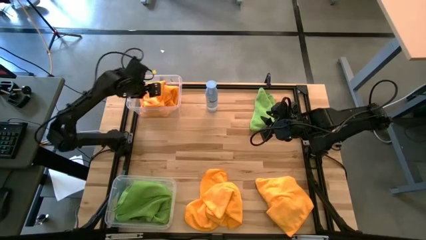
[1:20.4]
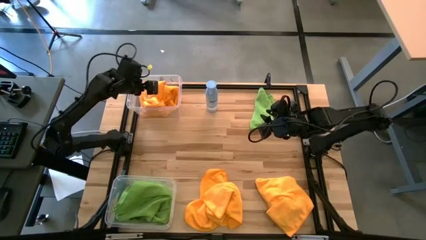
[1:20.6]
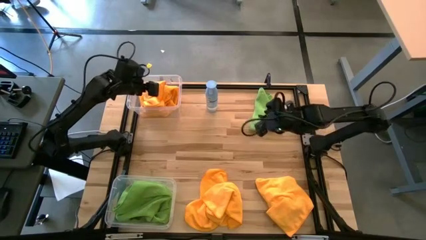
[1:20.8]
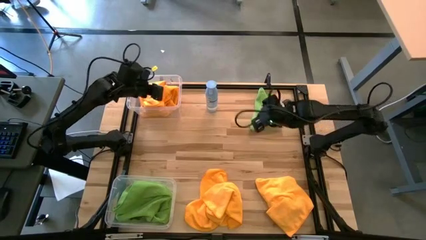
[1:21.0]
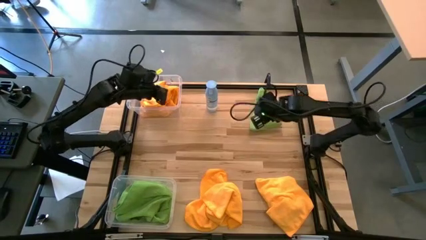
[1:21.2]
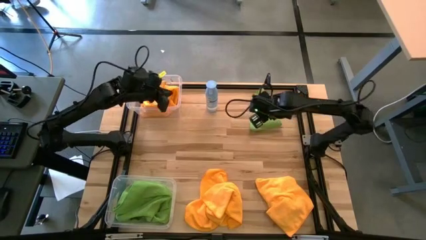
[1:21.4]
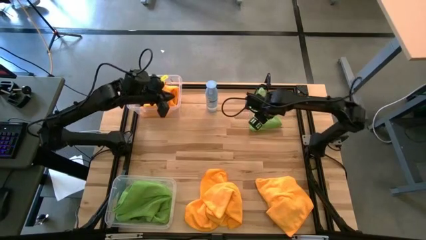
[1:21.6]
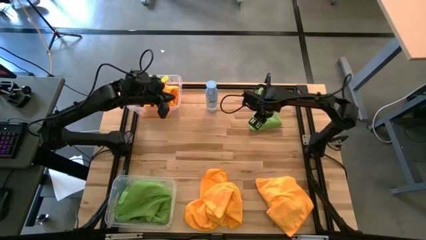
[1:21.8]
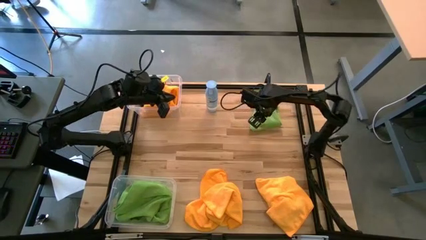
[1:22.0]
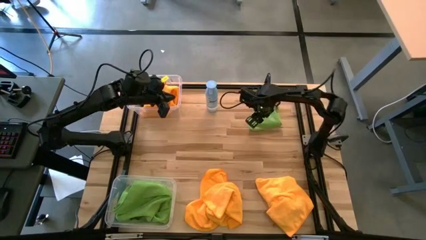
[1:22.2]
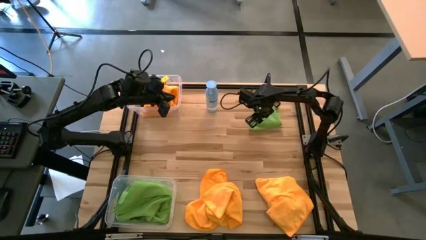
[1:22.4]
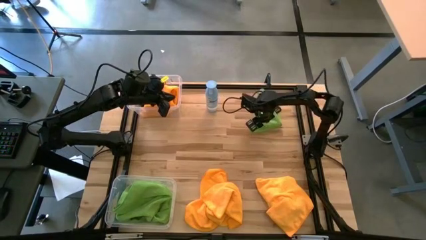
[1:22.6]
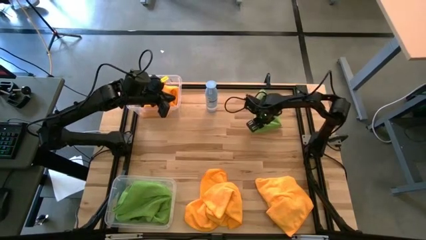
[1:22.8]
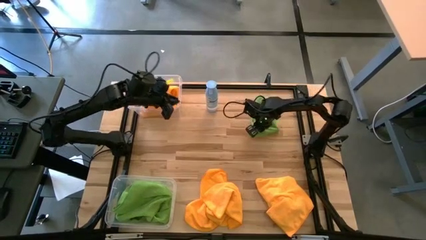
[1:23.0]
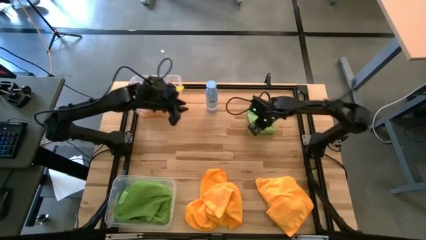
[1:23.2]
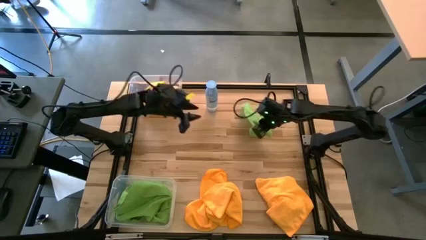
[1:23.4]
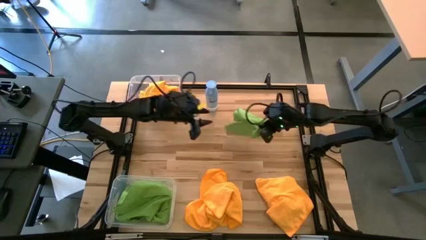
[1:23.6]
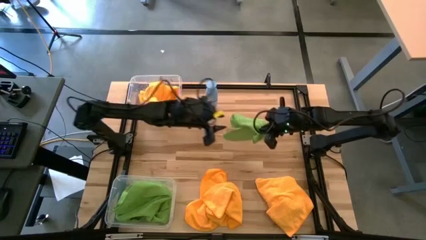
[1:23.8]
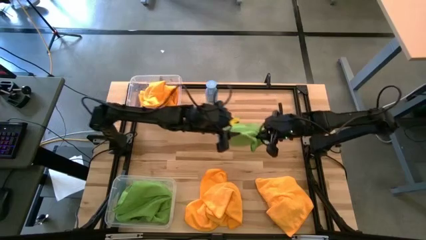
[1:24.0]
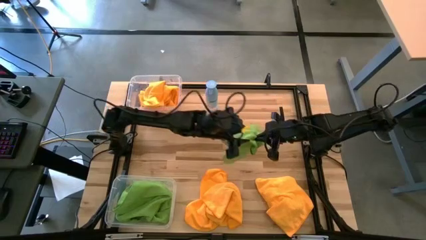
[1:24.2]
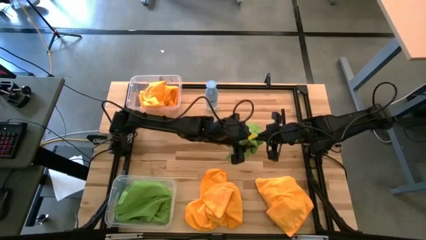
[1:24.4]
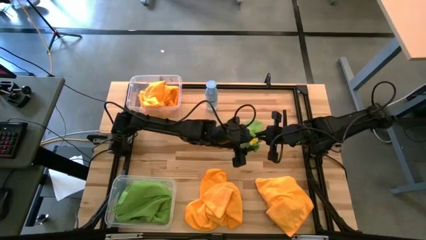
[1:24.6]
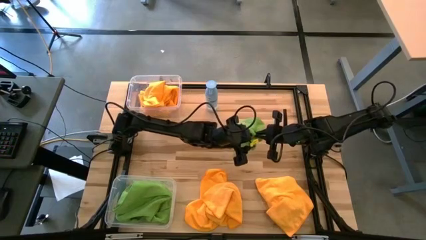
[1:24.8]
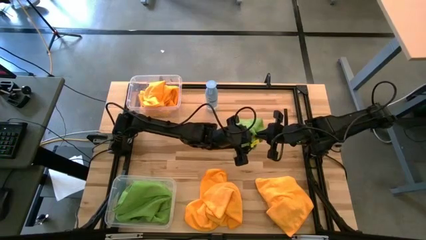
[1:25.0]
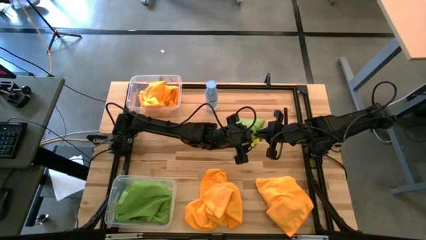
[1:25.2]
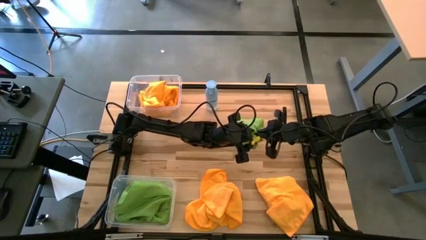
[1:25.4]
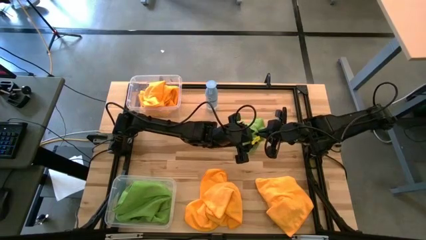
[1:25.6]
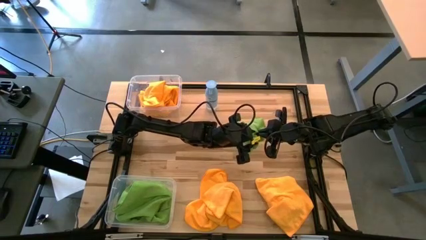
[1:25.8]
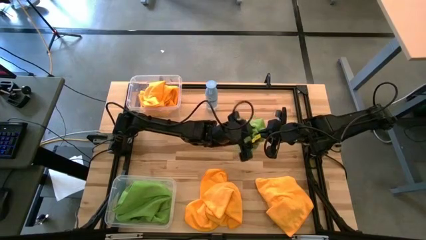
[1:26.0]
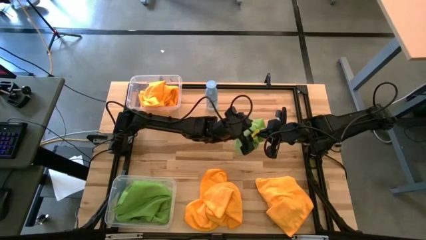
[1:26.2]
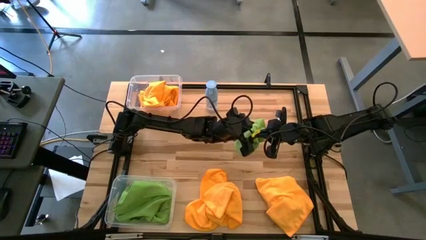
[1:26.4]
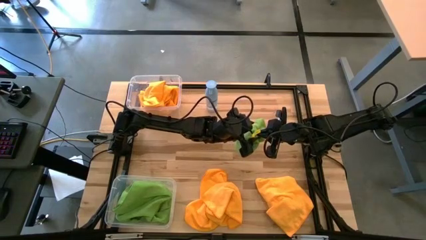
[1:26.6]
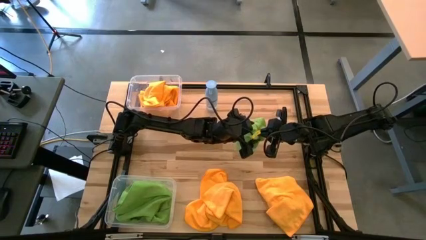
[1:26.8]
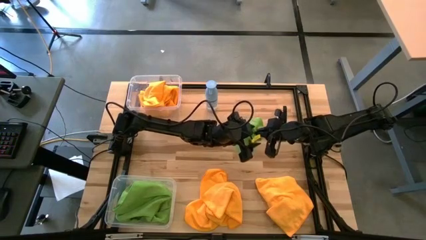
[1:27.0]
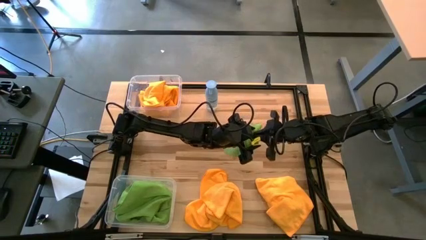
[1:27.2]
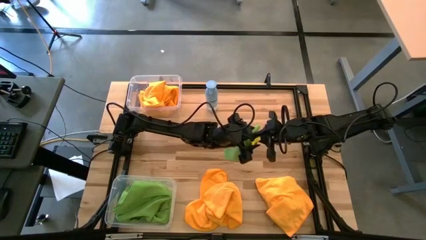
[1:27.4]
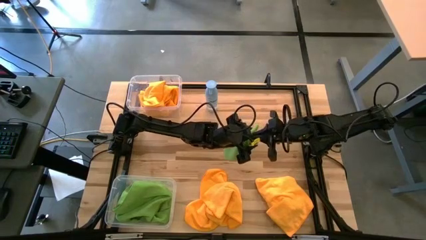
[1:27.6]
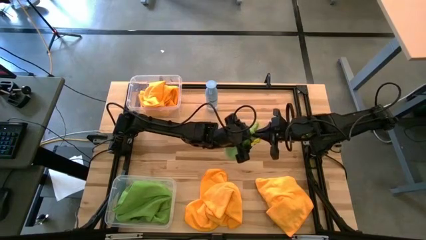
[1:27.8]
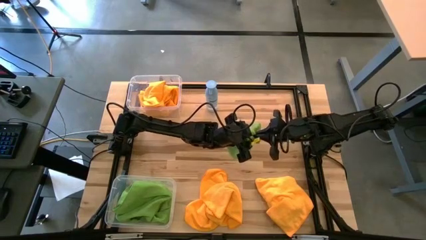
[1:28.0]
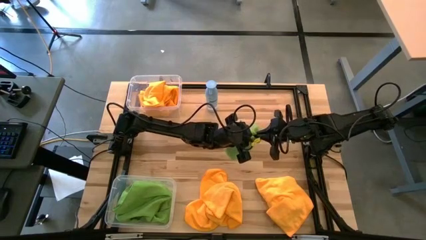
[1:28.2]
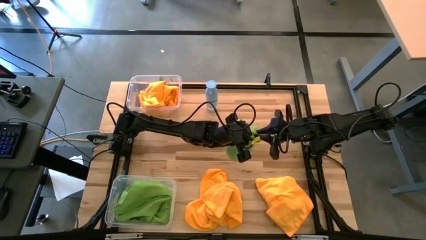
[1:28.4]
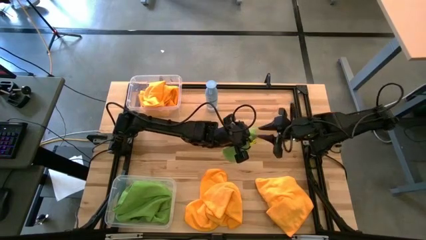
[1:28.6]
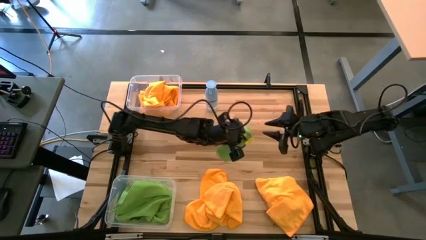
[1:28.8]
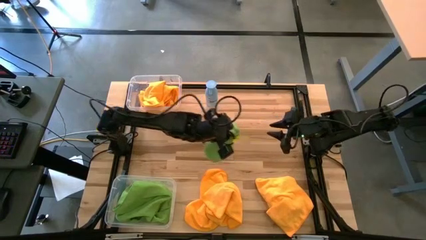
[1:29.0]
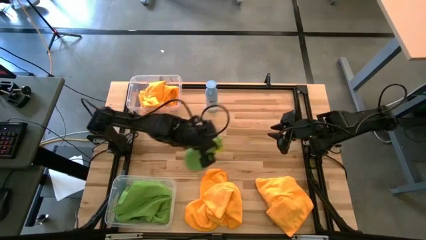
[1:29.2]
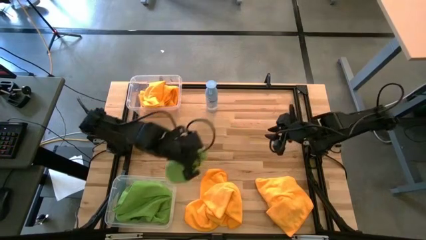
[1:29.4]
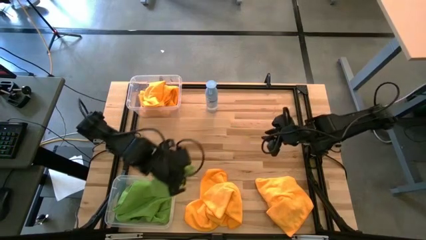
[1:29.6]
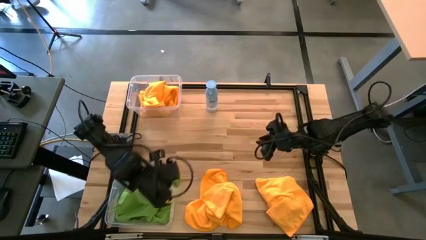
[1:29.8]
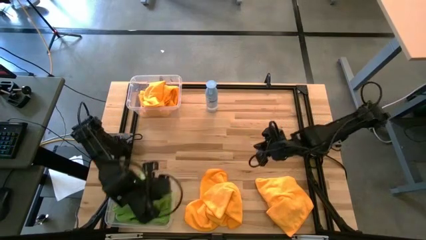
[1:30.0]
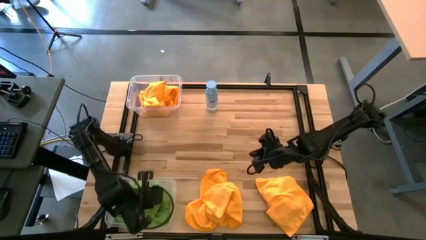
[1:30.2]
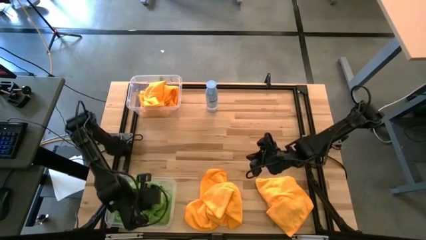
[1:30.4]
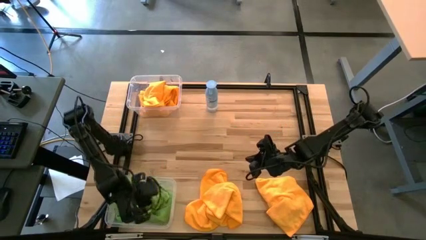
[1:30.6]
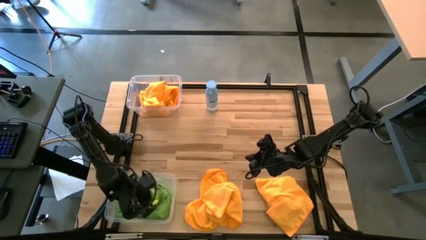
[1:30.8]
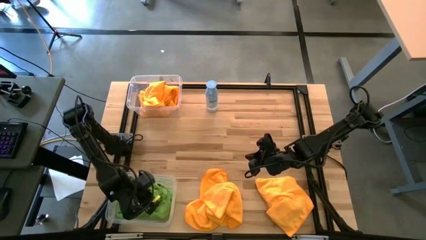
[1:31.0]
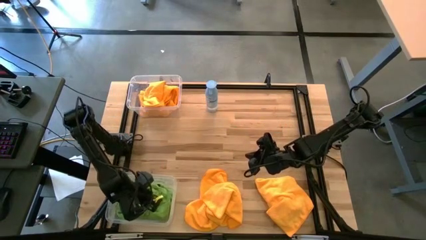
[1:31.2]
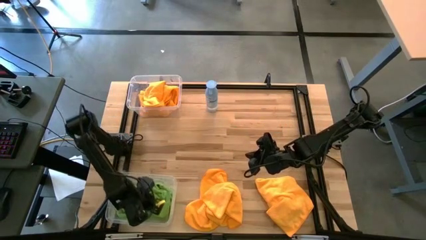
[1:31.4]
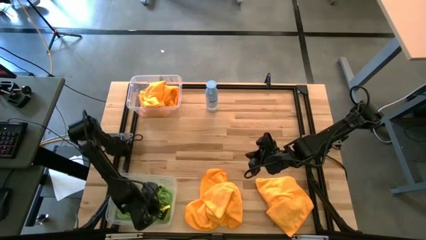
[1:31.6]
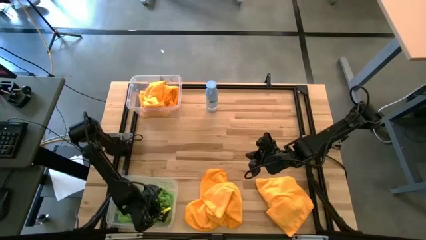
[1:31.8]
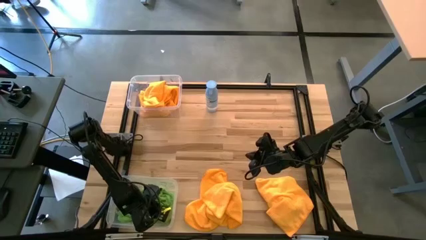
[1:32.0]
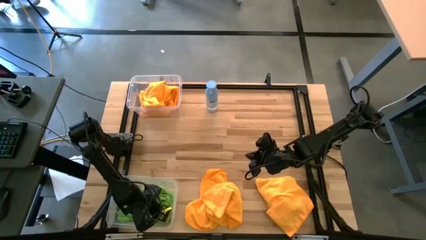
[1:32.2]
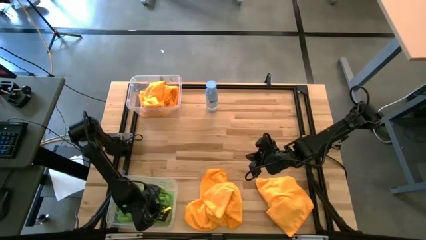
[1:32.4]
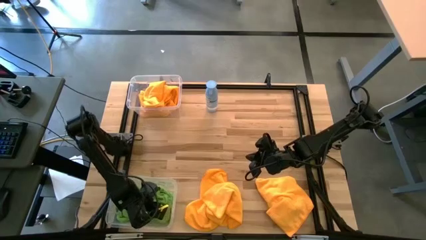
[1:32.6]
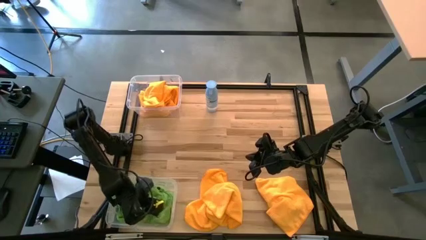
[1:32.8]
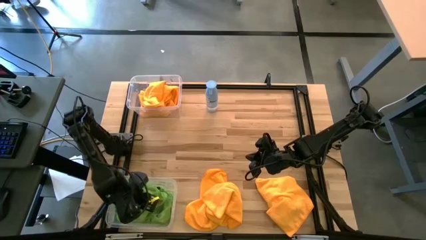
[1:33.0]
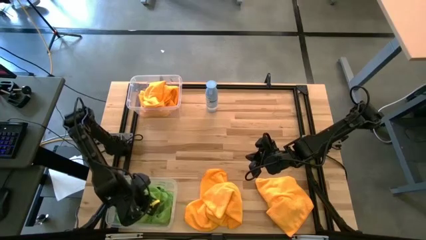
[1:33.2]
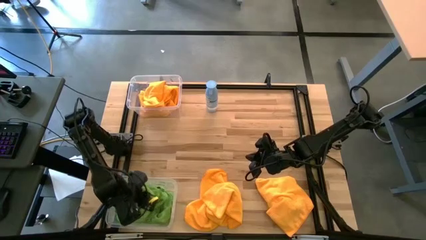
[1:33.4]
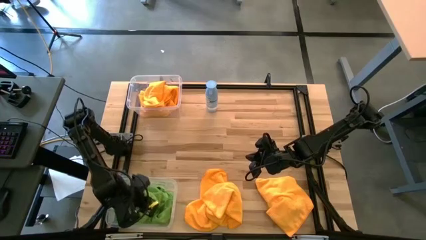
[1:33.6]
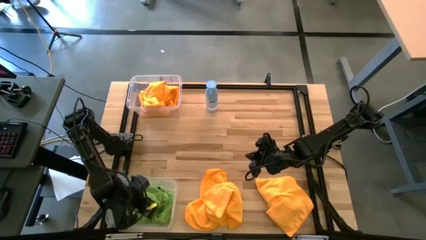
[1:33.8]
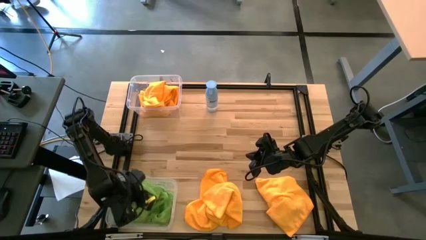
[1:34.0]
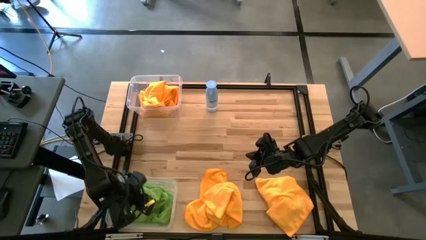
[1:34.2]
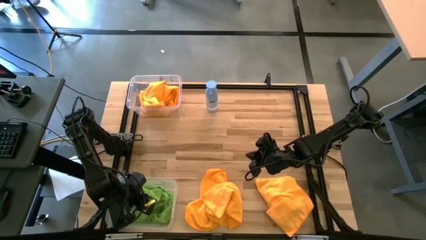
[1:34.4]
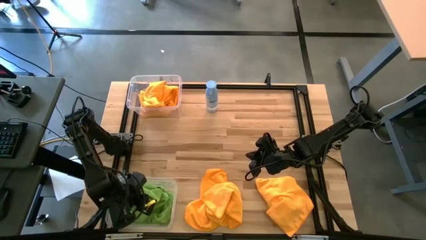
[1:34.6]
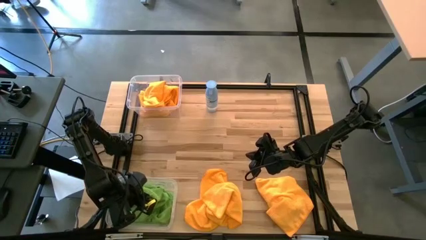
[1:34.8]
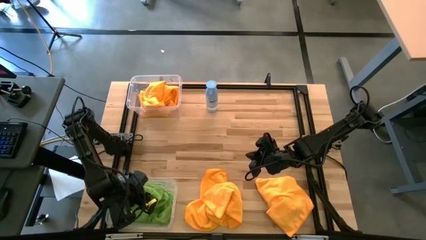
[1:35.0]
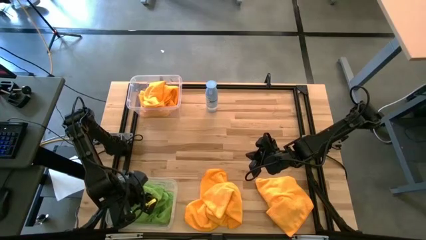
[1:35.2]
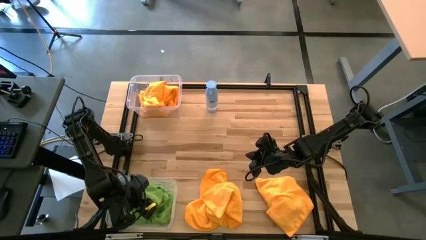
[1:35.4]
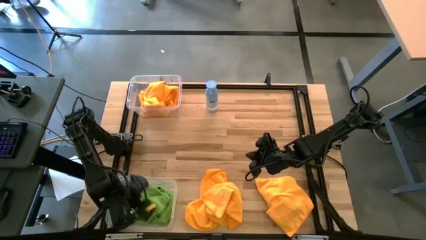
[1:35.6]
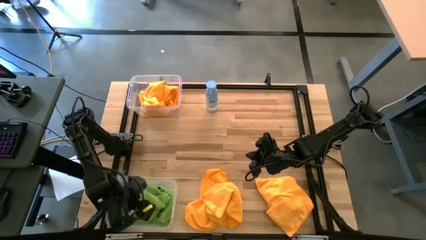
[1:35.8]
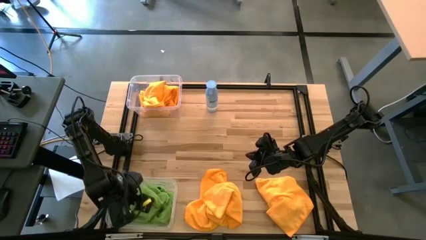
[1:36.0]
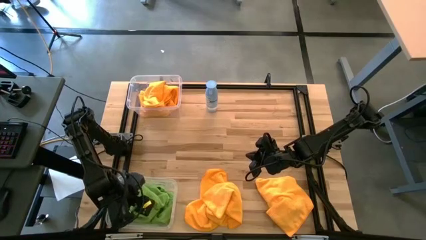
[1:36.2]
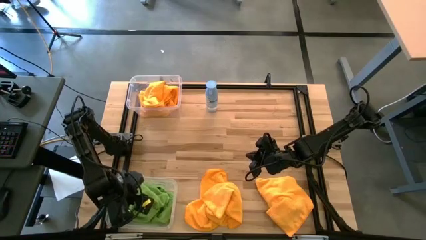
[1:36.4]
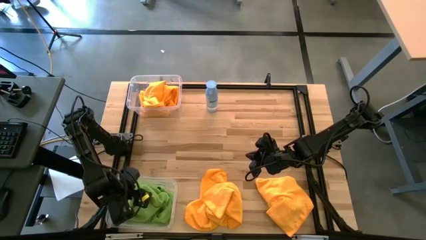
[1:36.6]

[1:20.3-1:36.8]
Task: Sort microfiber towel by color & place in baskets
Put the green microfiber towel into the bottom transparent bin
